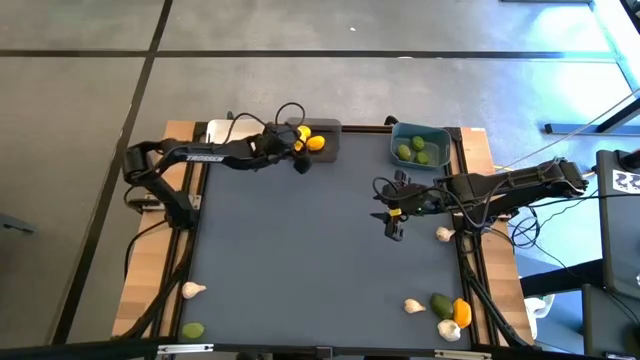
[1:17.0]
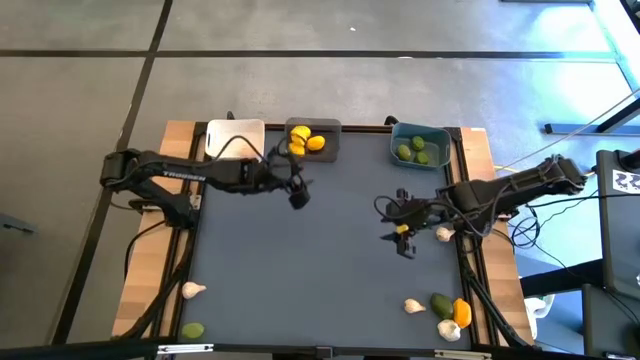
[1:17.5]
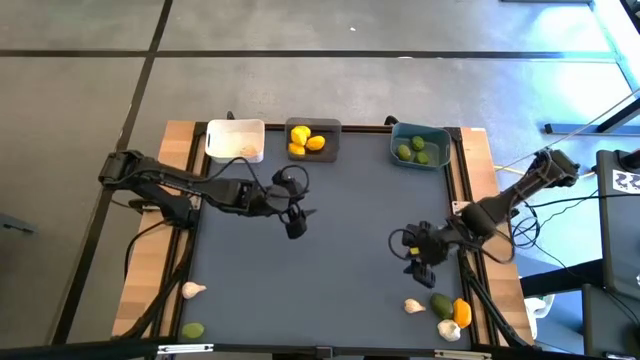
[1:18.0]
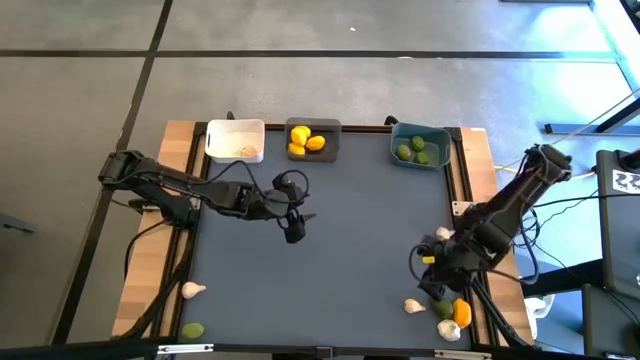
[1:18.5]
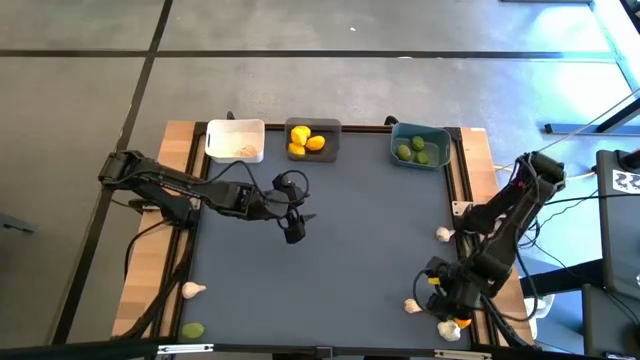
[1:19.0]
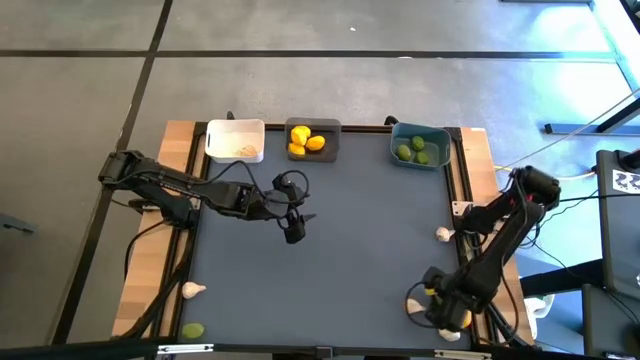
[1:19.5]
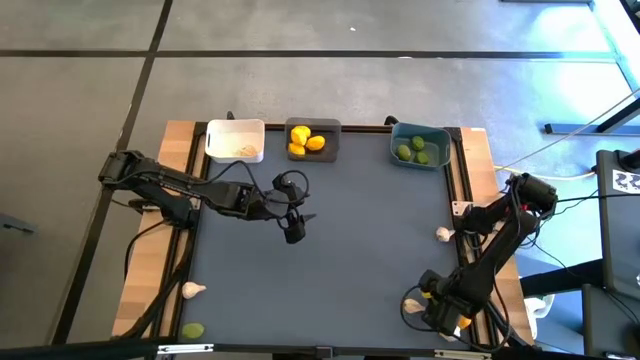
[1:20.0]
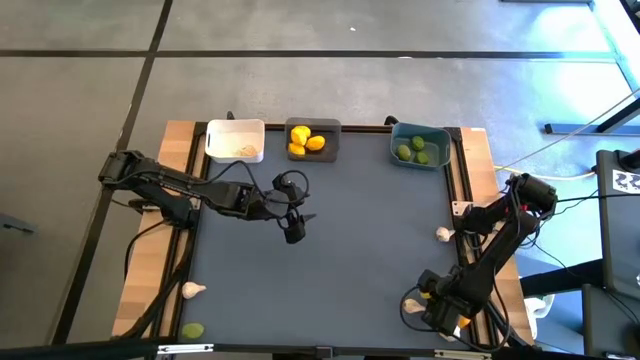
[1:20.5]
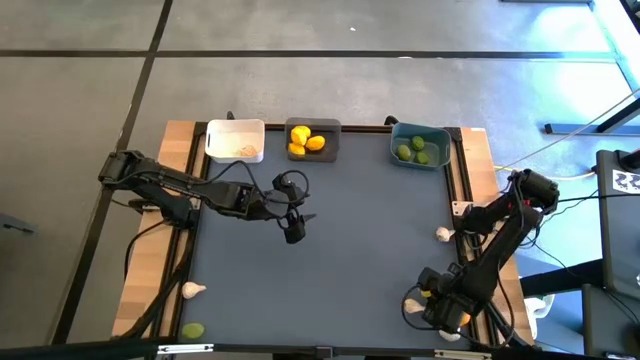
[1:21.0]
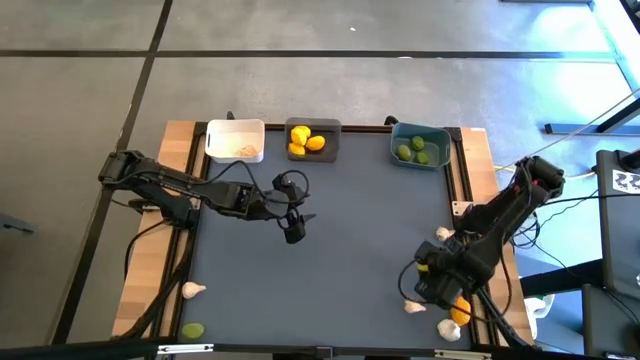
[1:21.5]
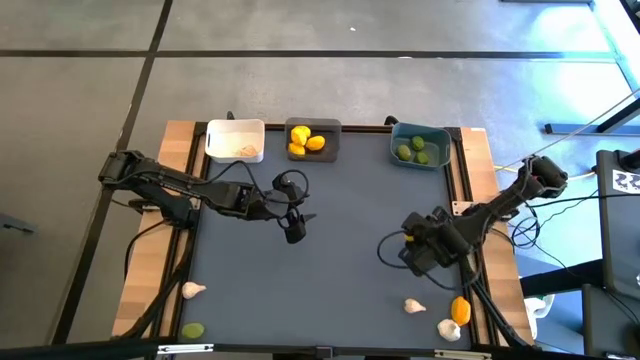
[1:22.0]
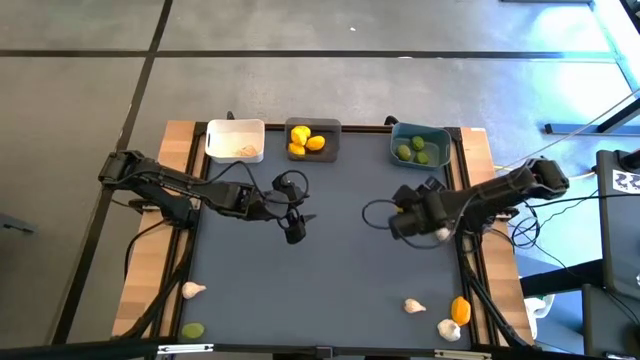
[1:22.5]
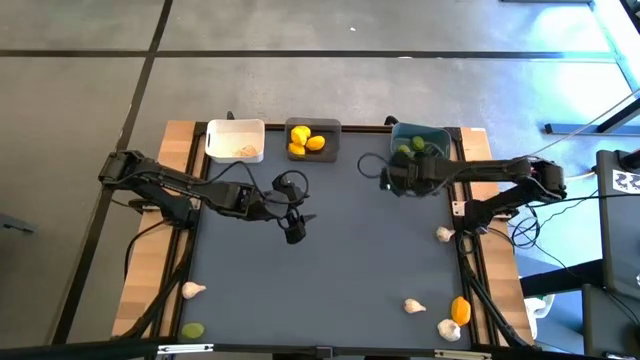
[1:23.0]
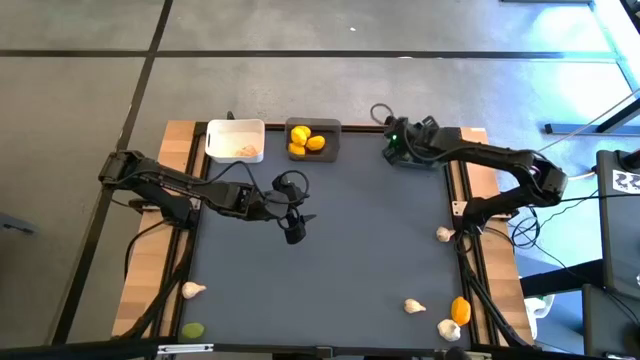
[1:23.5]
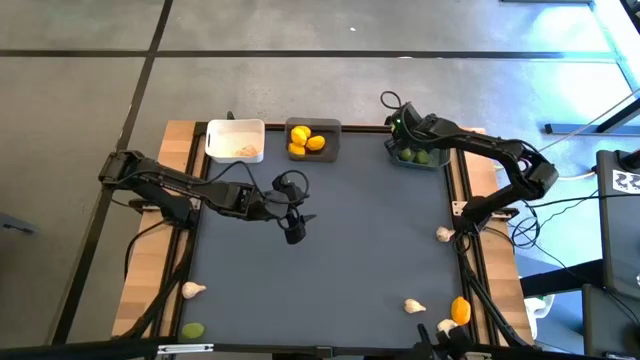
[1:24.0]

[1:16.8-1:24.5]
Task: Sort produce into baskets
Put the lime into the blue bin

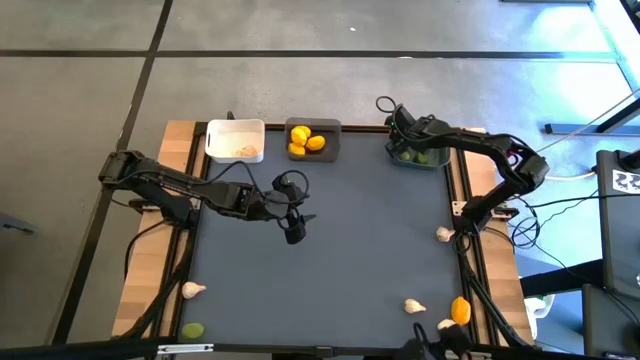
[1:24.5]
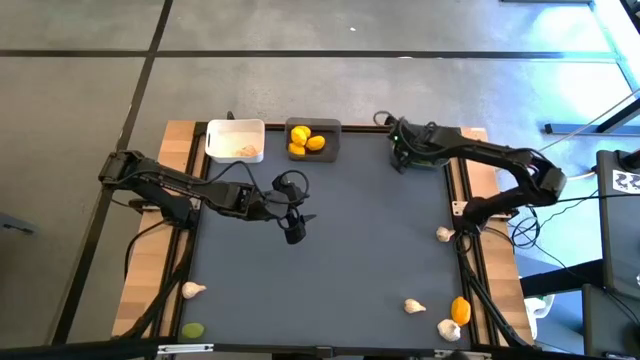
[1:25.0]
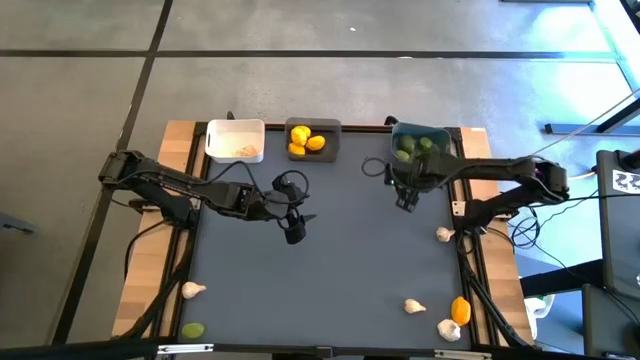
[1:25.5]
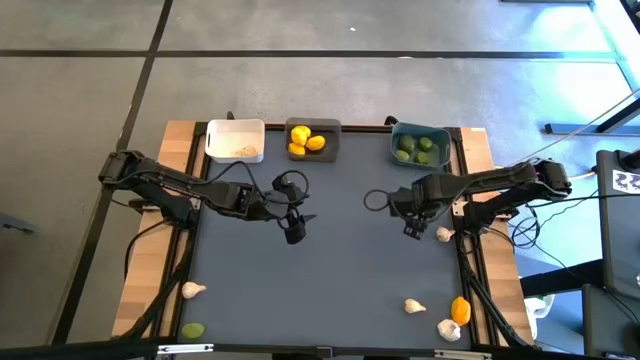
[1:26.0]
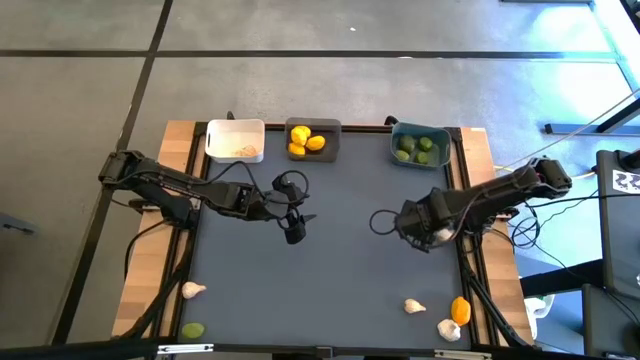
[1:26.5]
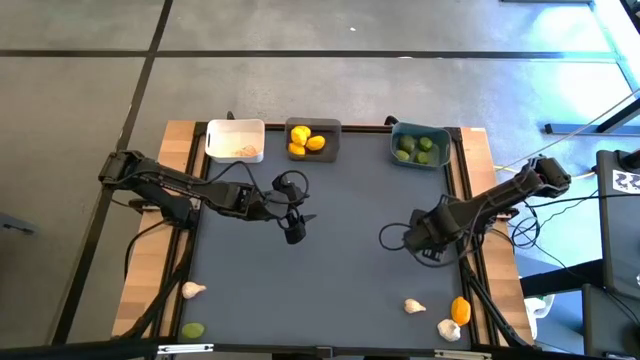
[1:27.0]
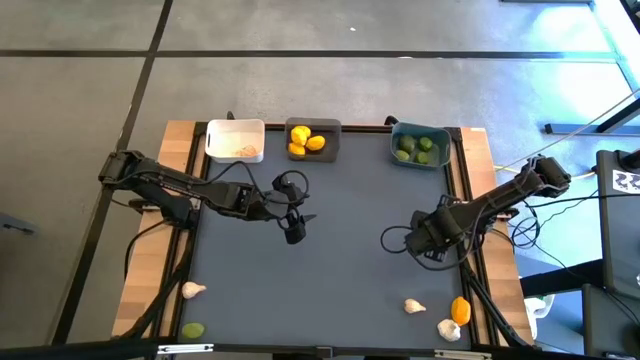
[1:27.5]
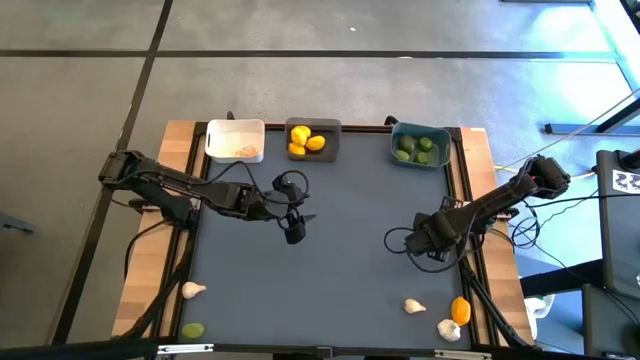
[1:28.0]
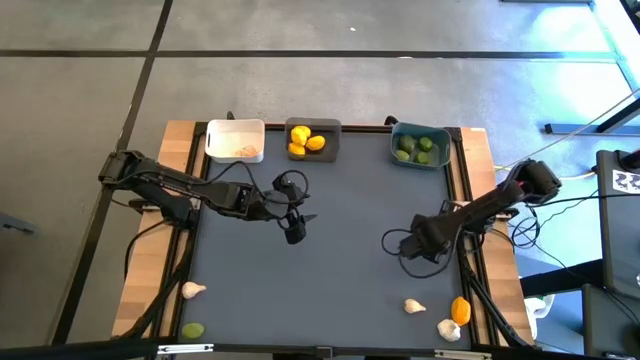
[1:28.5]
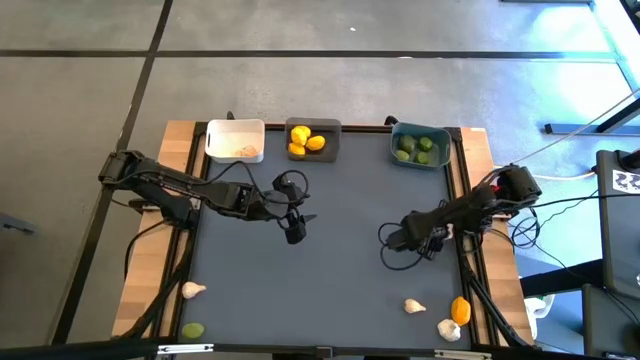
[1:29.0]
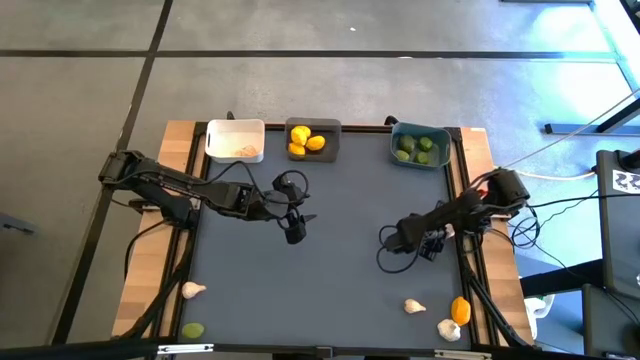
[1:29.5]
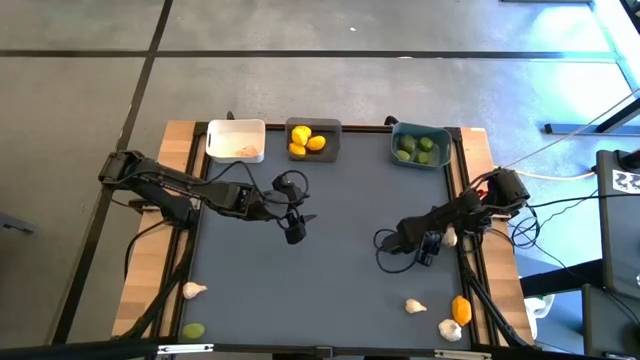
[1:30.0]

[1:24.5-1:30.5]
Put the garlic into the white bin

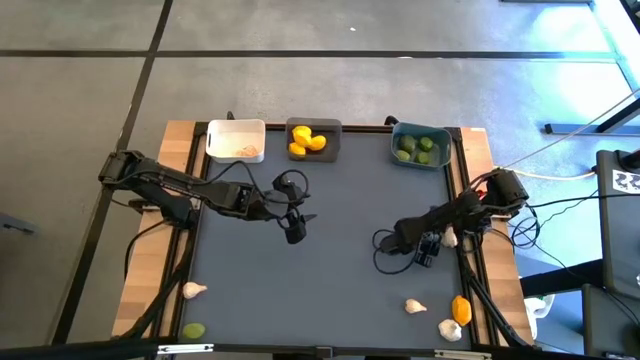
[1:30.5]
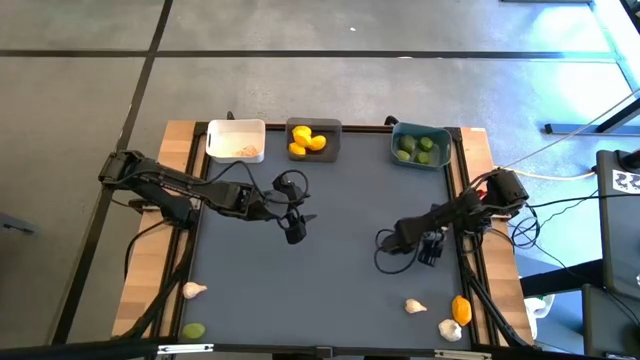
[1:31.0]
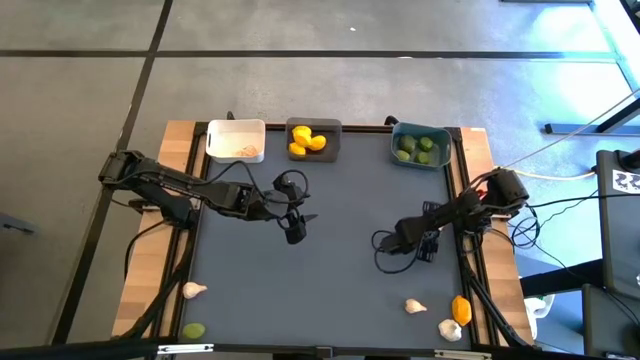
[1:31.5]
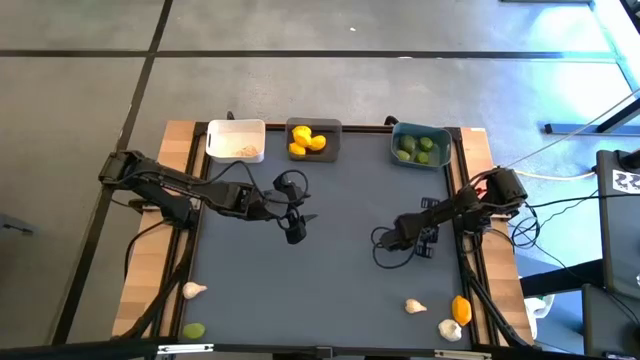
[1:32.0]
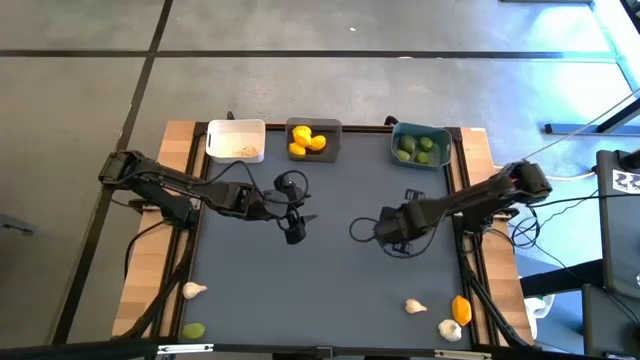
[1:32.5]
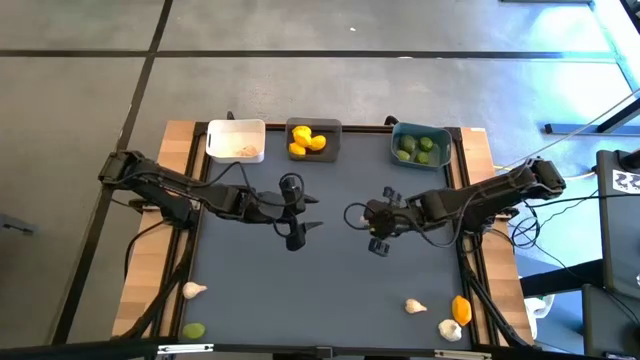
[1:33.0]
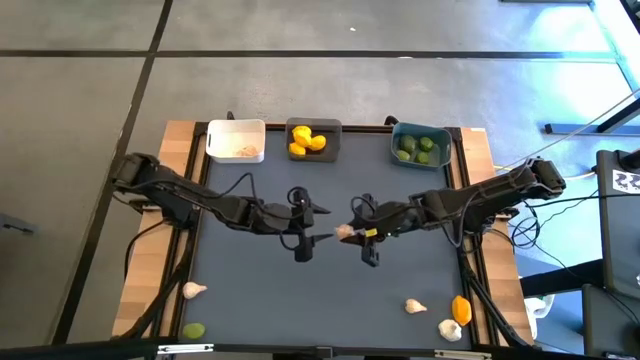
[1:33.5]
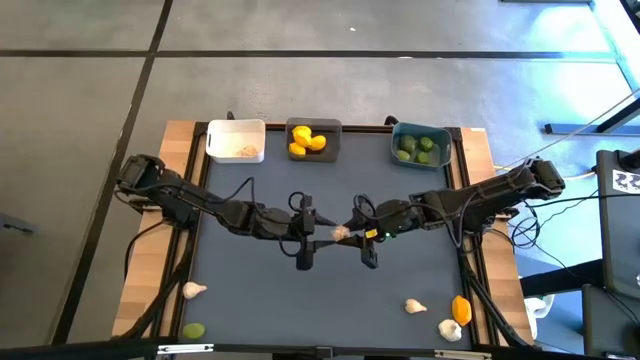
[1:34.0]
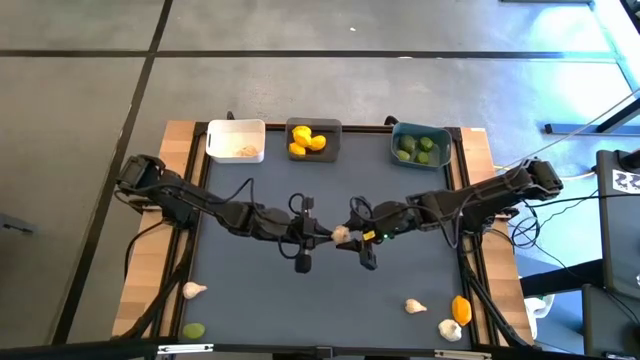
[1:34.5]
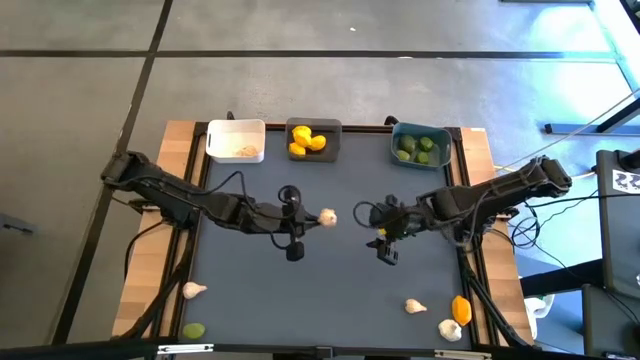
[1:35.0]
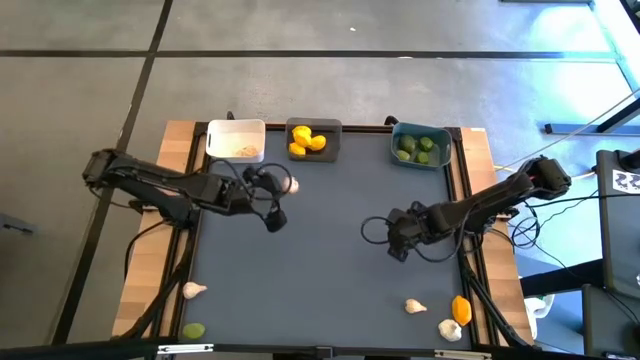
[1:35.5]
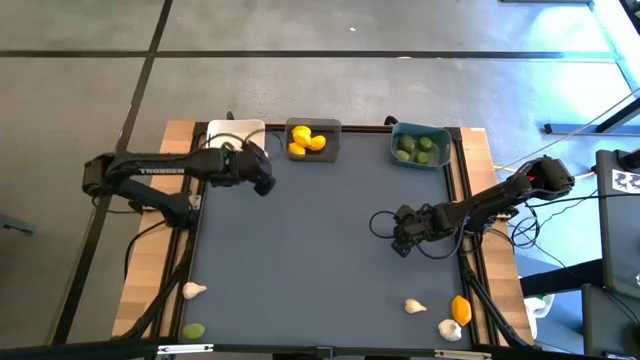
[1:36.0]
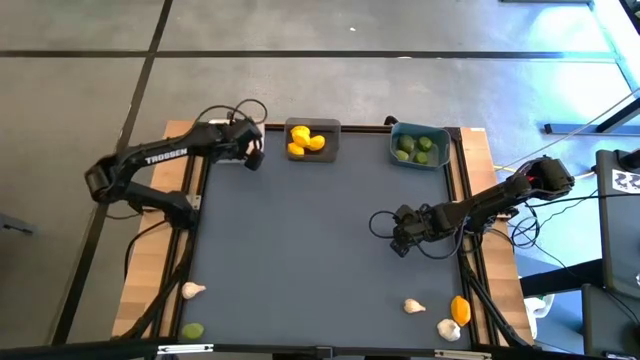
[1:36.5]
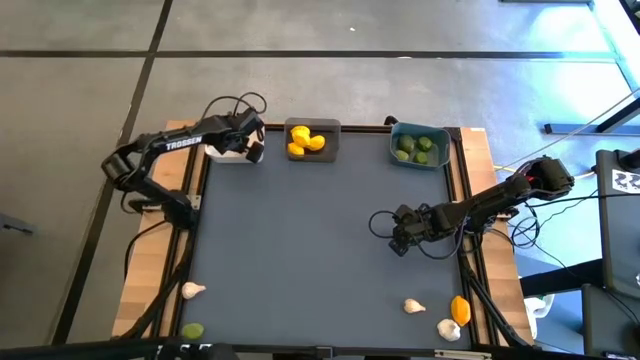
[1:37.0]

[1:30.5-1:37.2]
Put the garlic into the white bin
